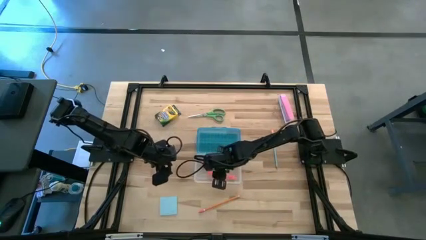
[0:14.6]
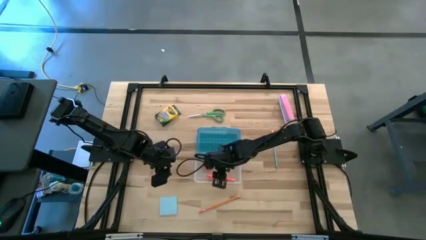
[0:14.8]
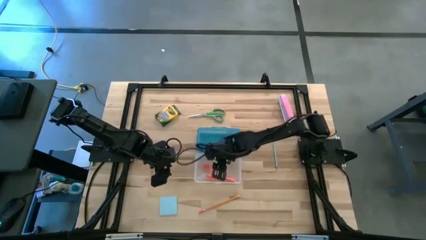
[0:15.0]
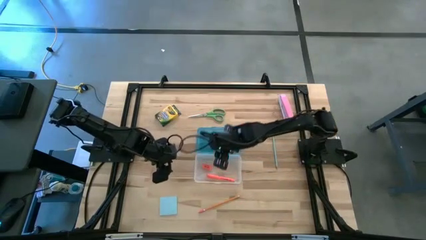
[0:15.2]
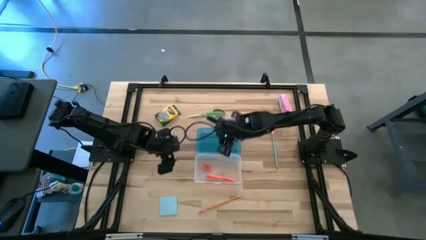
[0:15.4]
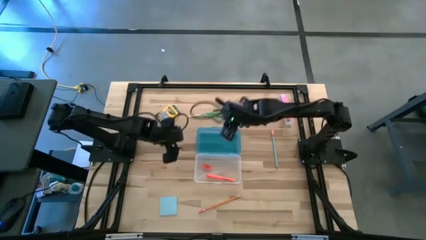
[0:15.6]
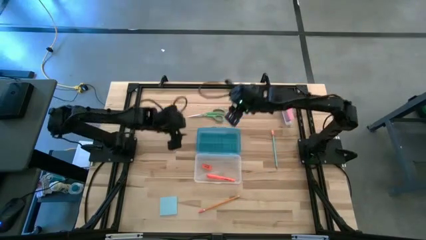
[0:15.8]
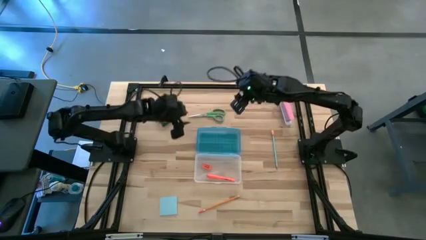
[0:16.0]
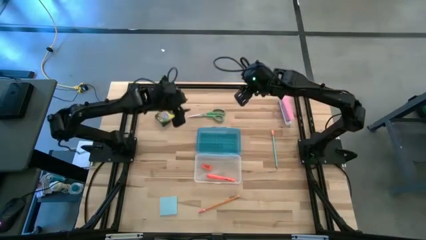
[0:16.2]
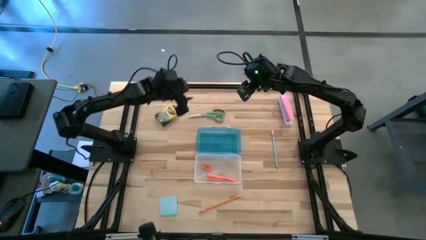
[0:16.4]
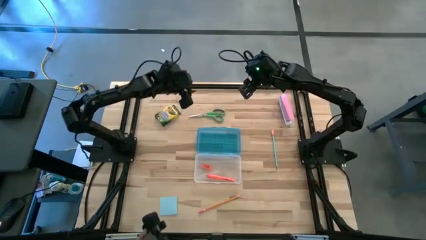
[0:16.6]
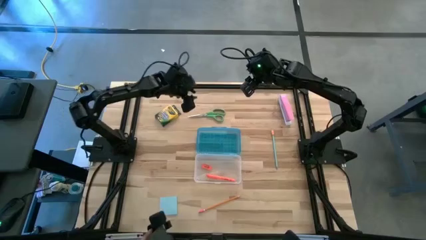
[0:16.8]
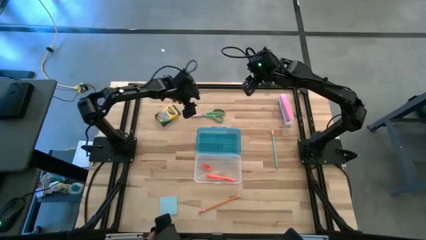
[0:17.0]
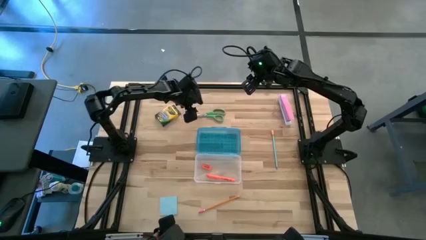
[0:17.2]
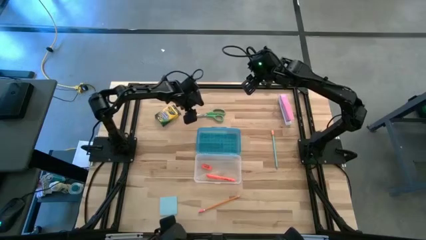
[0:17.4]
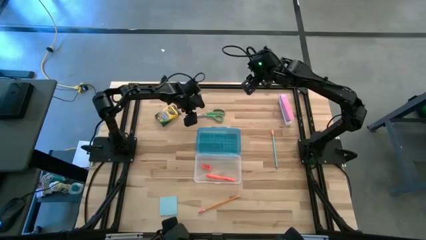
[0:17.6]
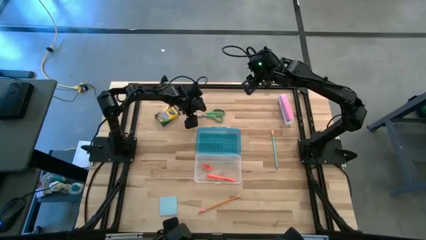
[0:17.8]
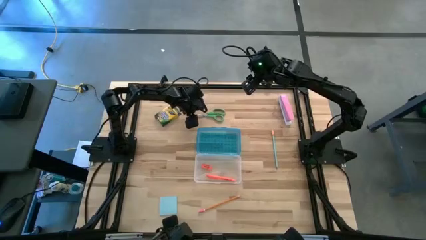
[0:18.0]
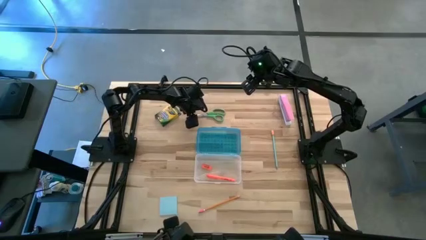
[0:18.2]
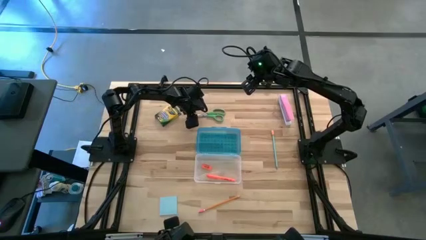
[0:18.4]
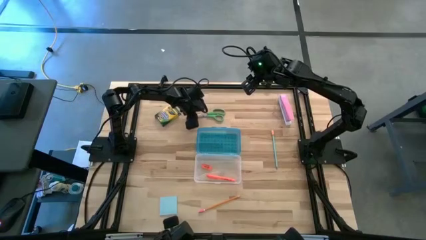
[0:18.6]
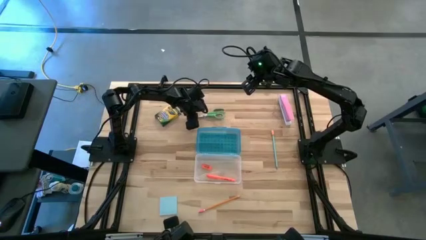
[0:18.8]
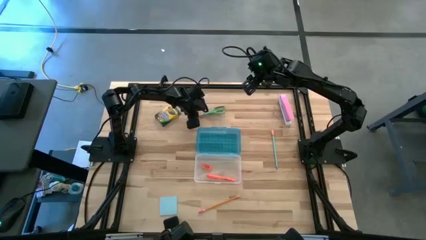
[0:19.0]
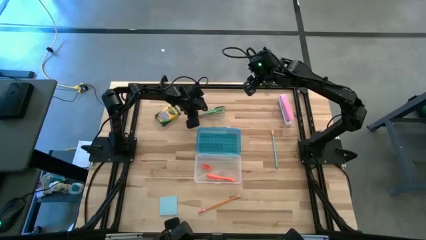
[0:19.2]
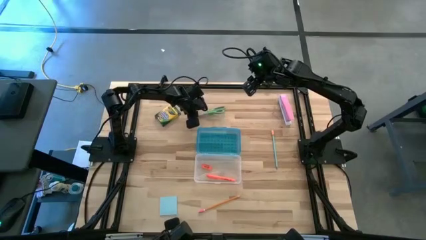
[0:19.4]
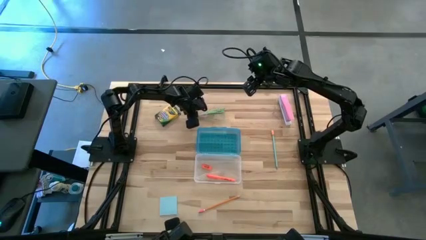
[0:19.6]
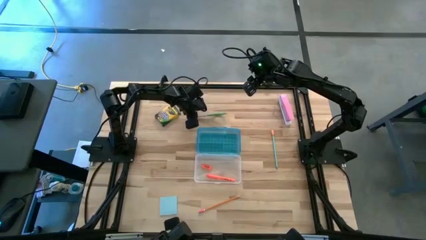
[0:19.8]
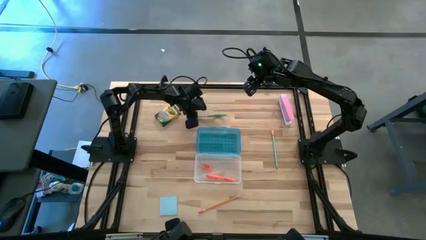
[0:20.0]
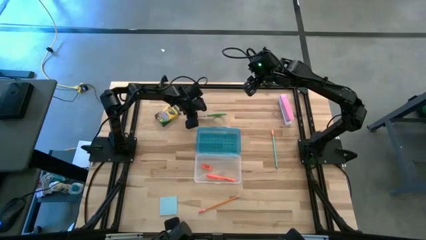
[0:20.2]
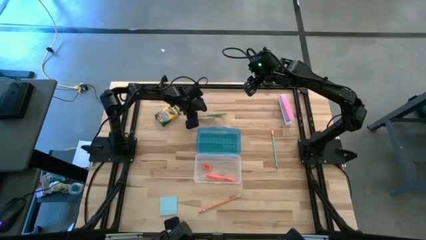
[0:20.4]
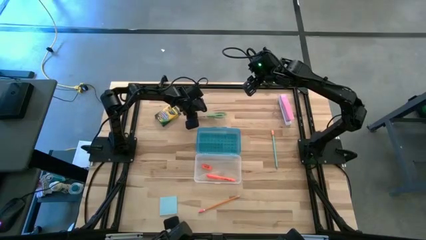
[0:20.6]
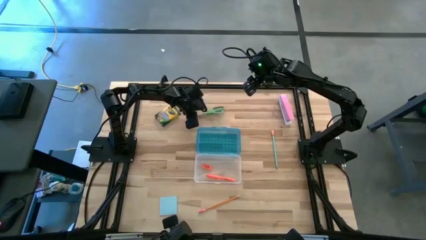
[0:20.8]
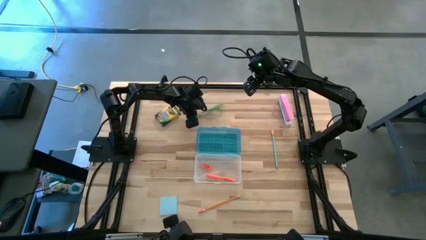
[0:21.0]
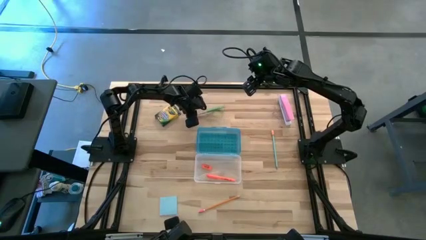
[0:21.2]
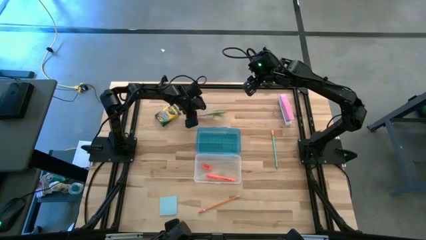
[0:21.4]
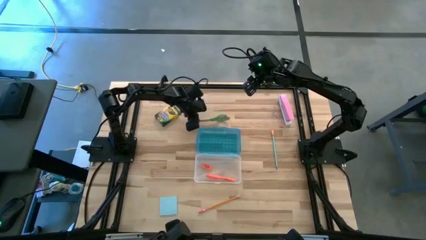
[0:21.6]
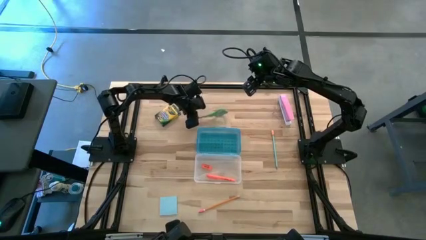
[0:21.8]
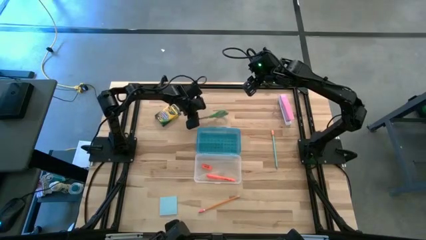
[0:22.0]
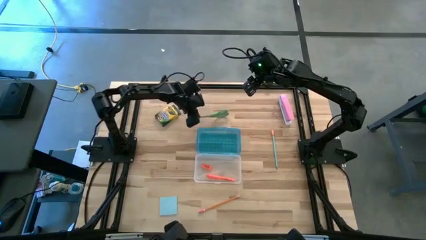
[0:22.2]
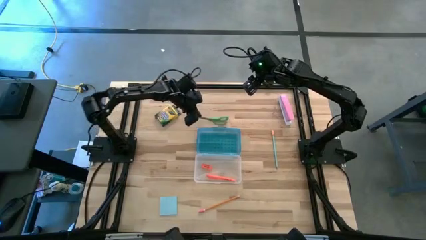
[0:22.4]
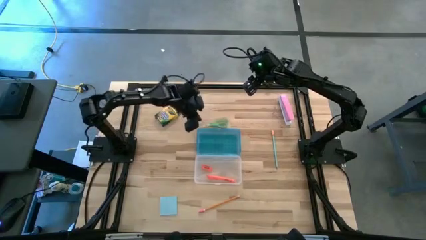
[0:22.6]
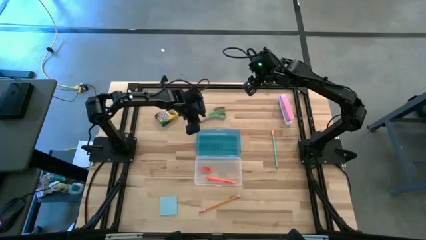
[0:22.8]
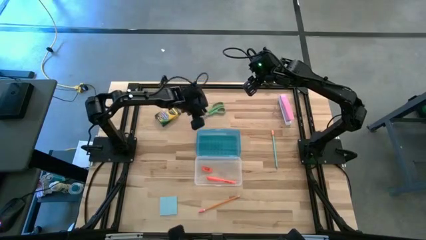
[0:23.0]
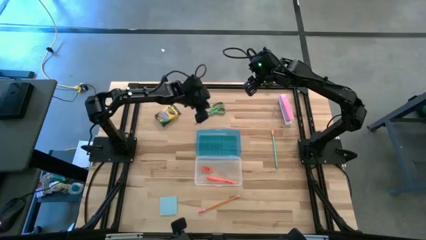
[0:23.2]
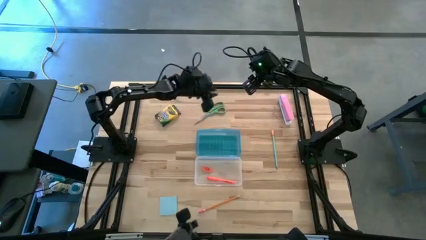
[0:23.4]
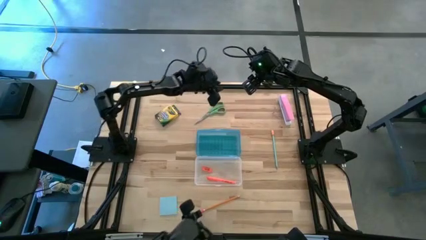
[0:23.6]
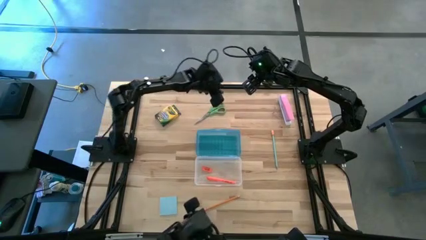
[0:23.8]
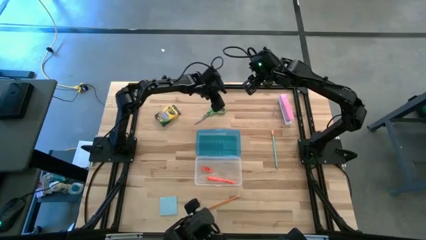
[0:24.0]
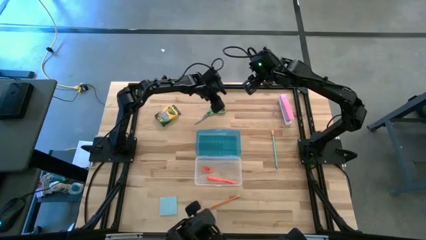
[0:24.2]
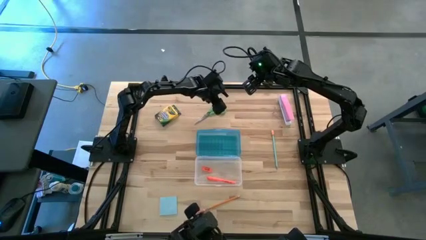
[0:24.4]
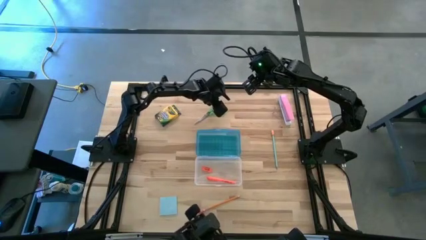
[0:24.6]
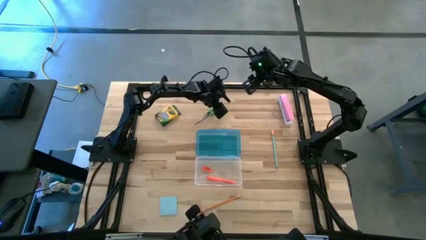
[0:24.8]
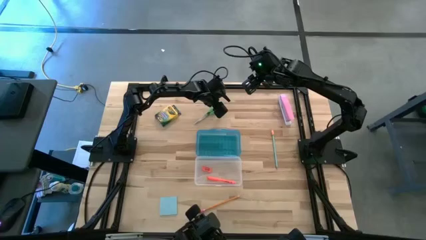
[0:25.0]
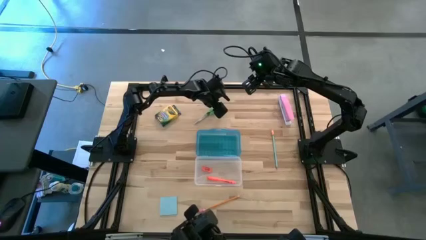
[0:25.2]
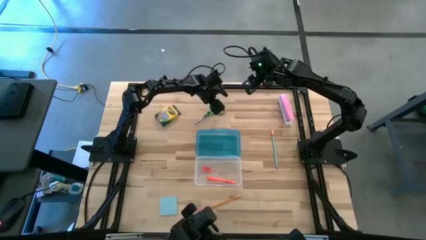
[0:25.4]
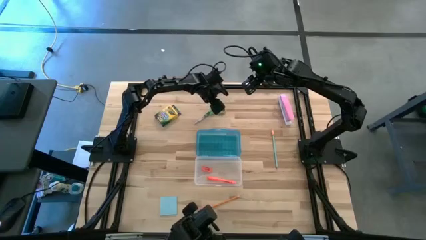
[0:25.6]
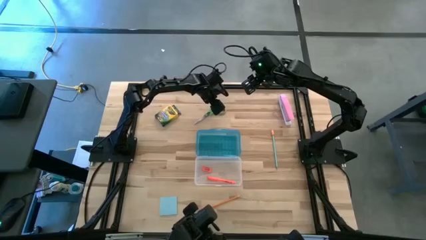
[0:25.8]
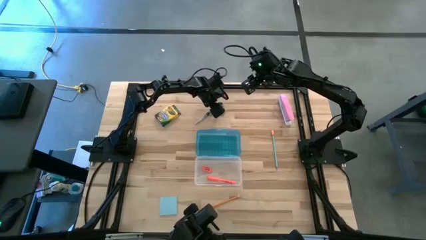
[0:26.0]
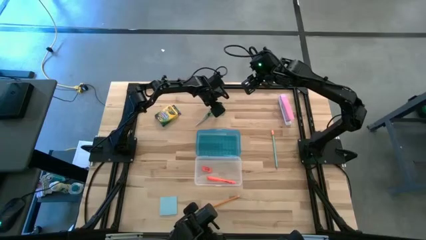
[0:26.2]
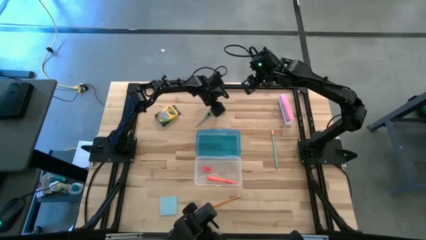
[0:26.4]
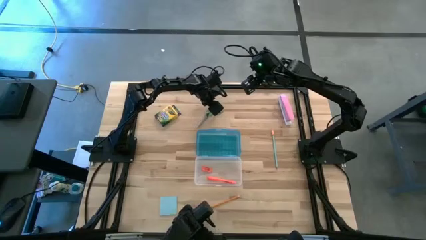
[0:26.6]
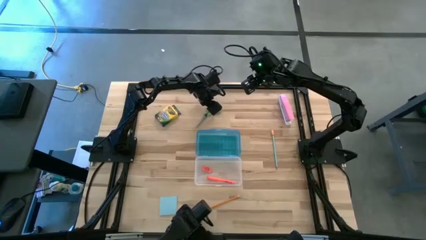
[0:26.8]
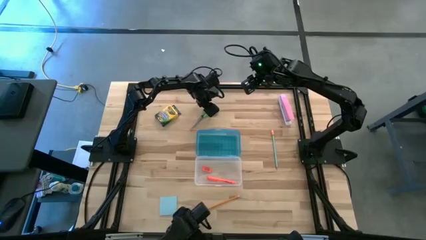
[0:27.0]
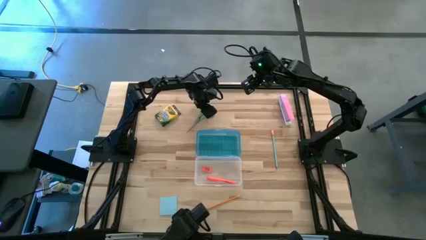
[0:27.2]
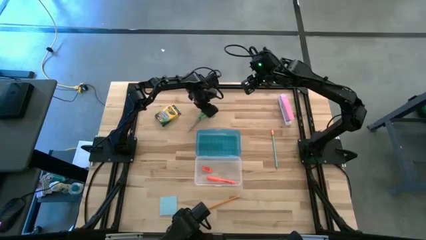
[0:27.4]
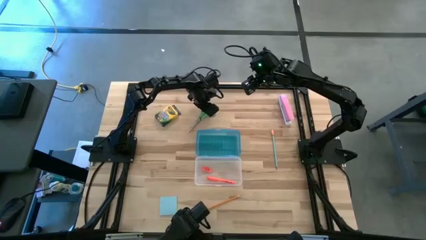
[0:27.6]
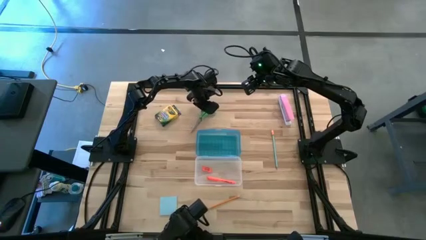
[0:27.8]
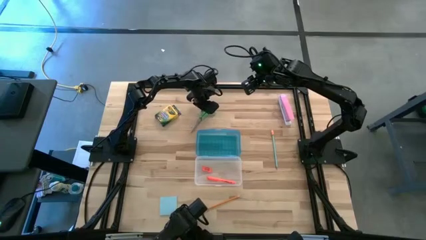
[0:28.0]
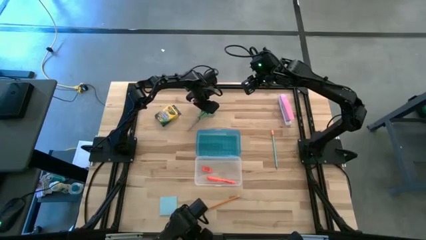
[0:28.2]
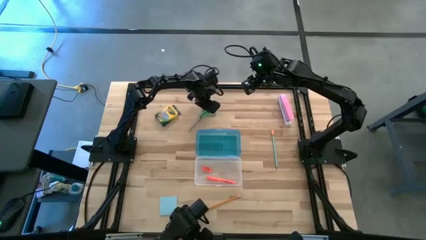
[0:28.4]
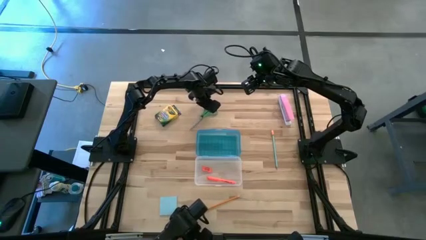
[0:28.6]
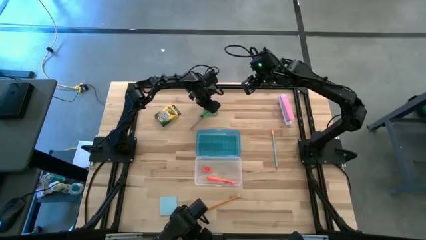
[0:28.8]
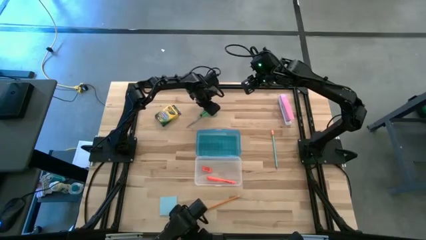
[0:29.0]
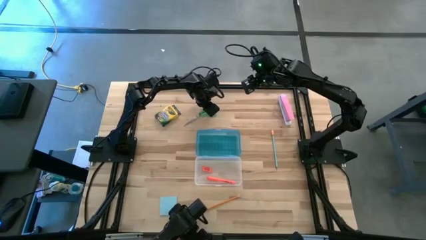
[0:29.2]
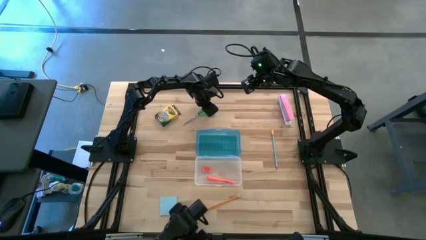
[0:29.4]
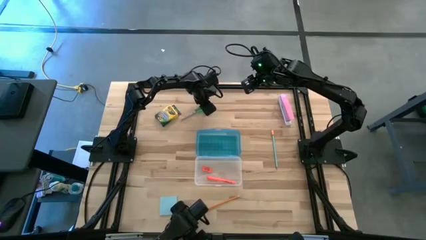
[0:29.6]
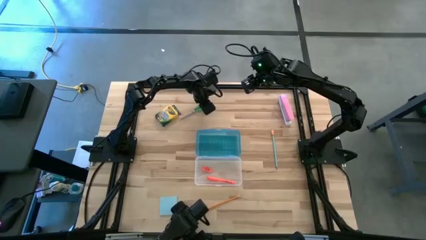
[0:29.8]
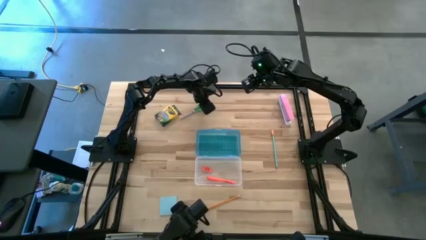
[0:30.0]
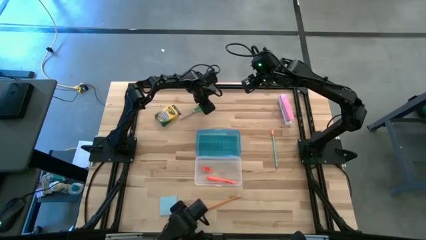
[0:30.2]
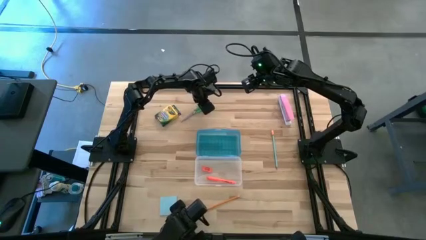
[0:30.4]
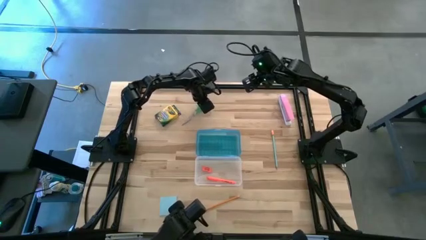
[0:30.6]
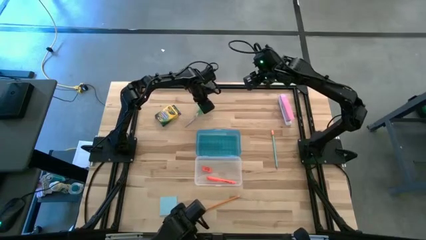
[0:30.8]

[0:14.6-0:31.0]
Task: Pack school essentials
Put the green scissors into the blue supply box
